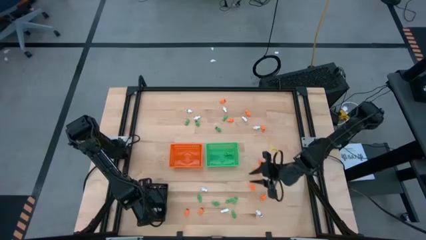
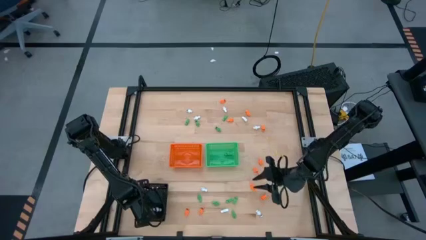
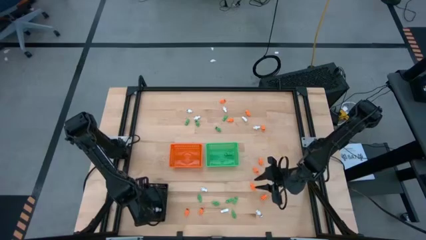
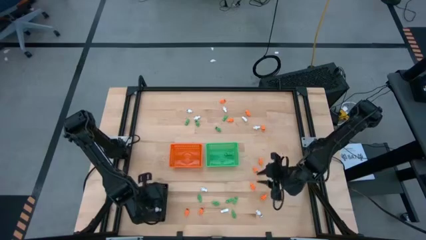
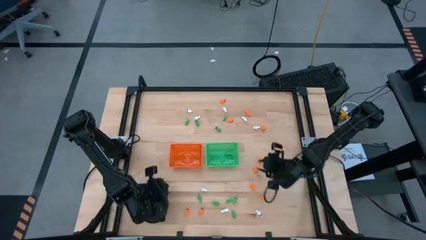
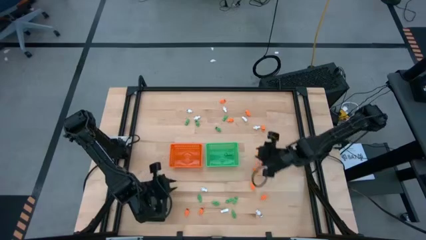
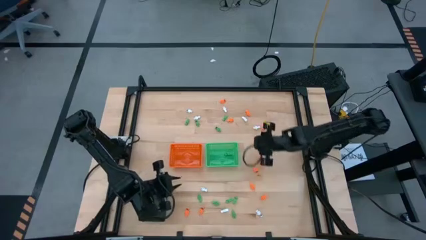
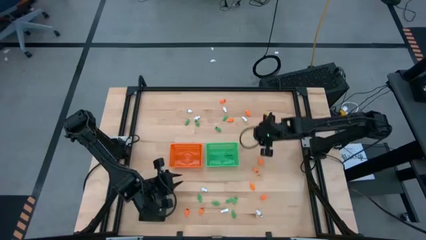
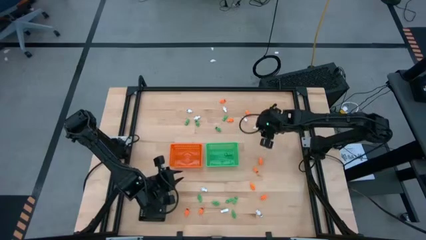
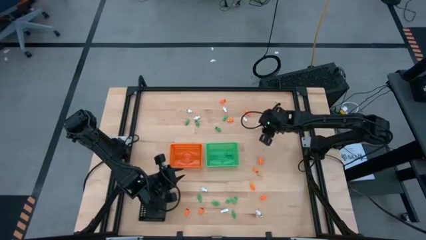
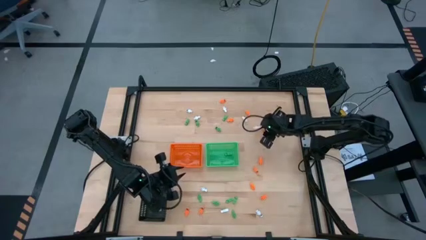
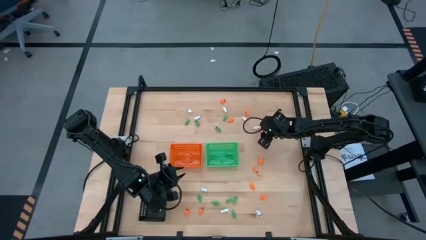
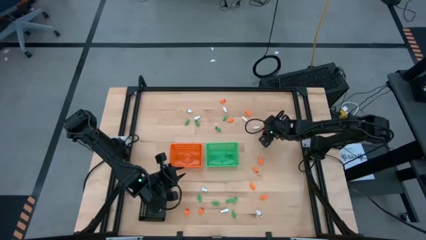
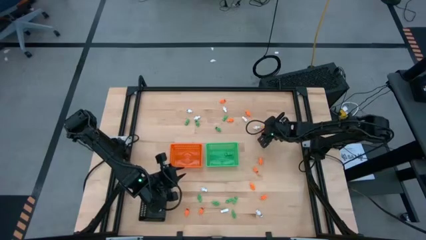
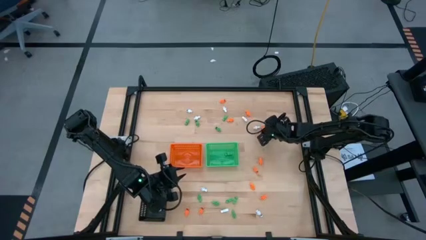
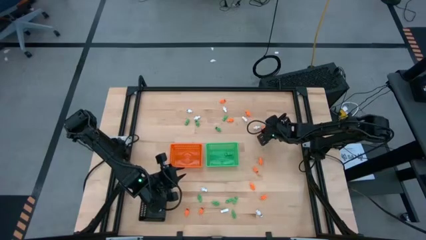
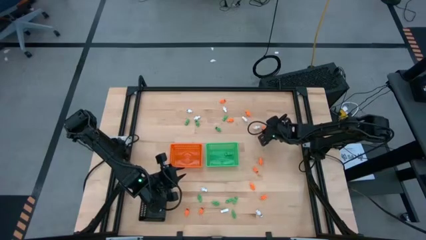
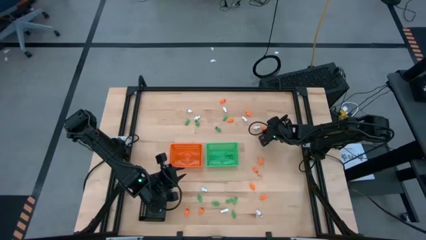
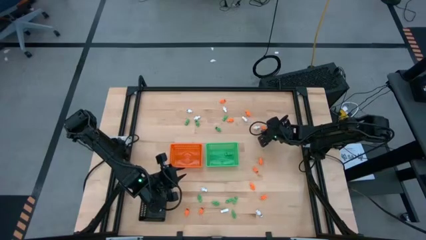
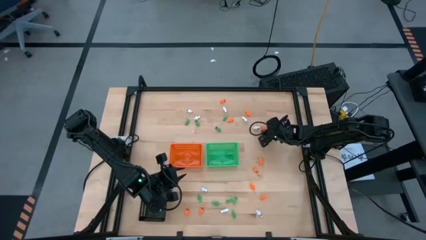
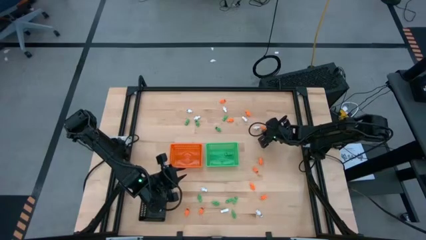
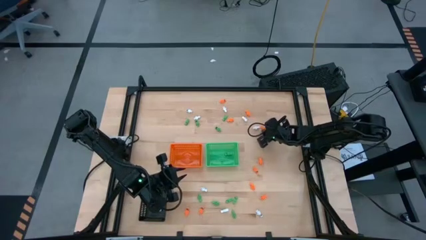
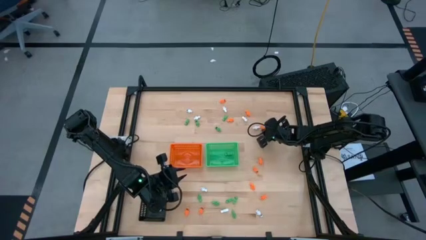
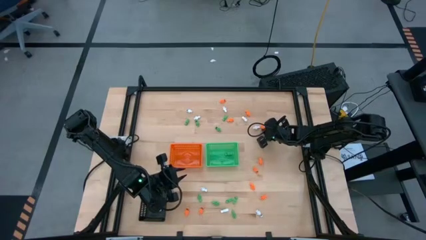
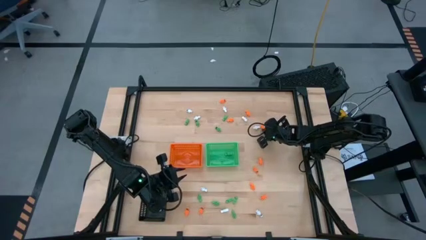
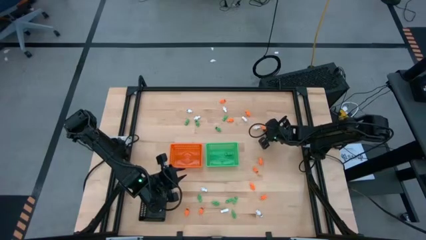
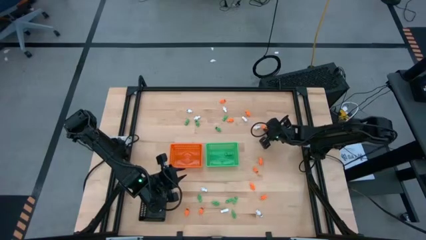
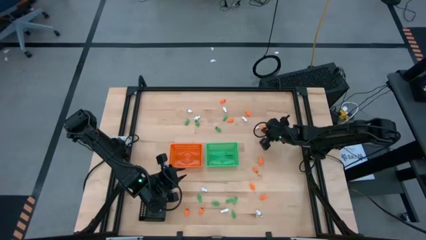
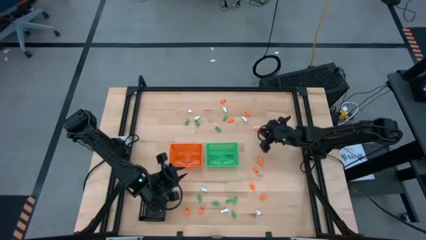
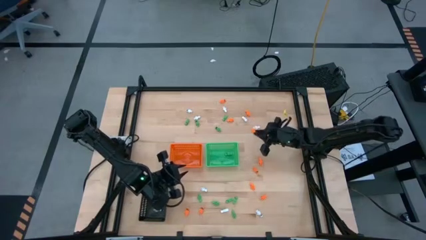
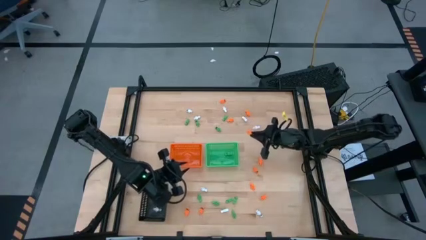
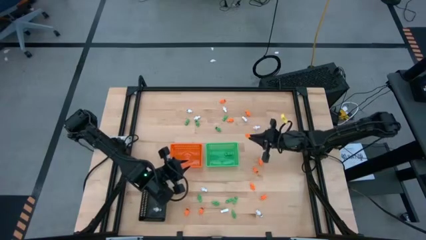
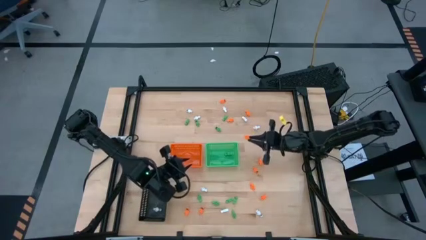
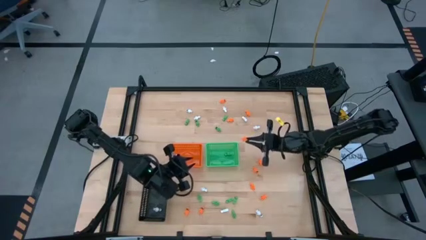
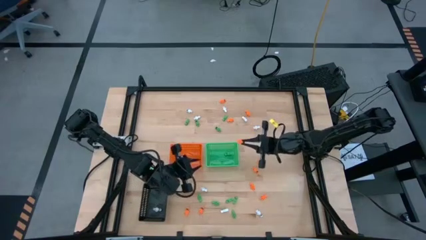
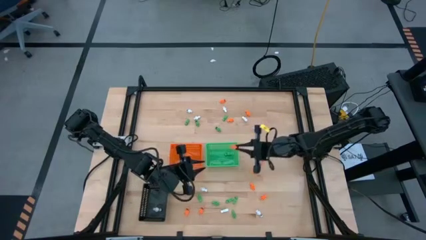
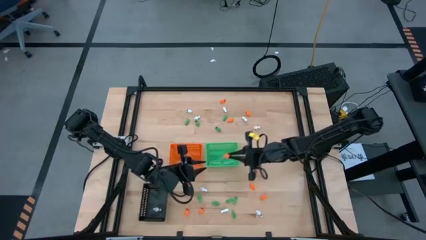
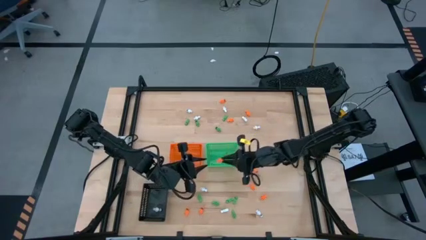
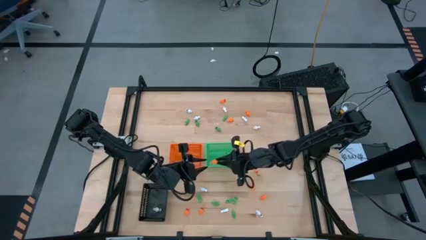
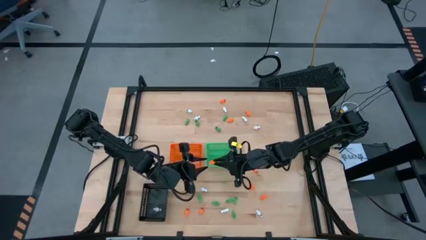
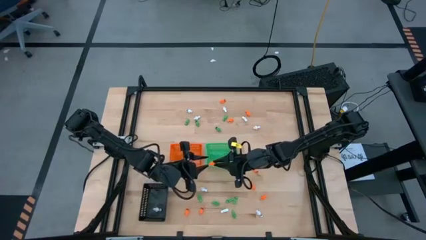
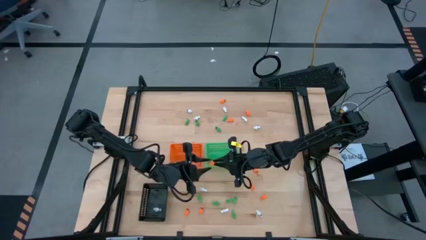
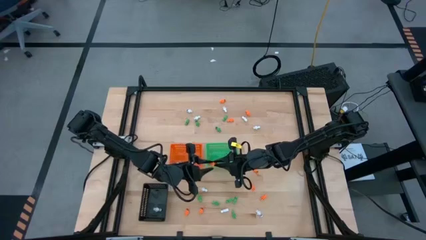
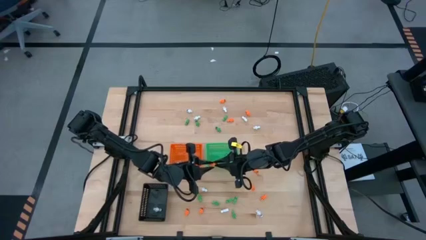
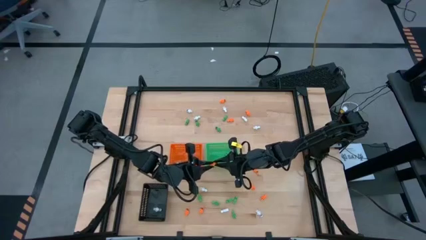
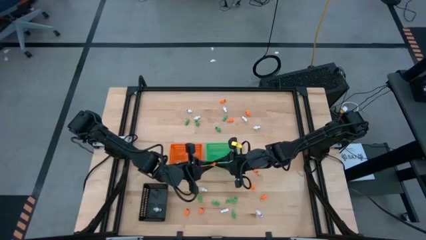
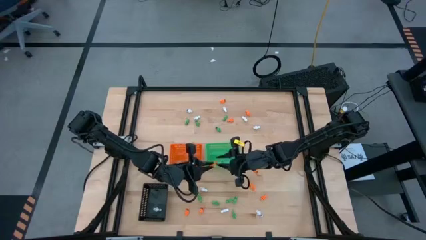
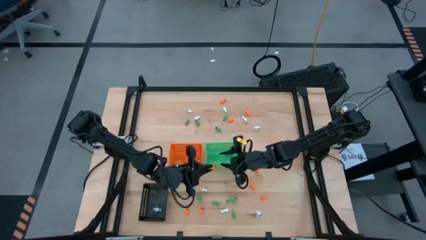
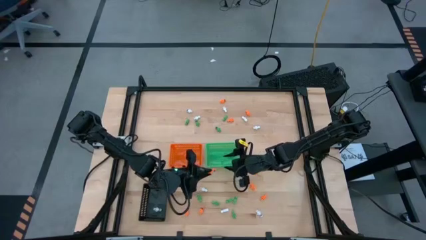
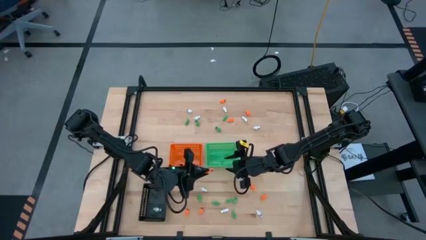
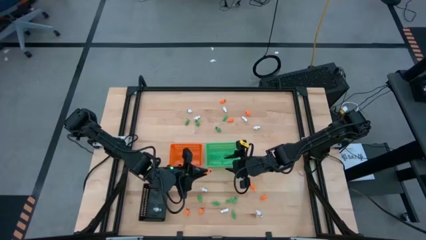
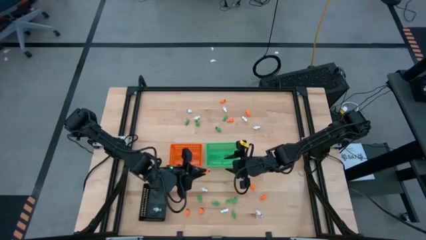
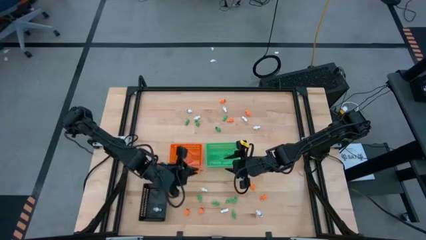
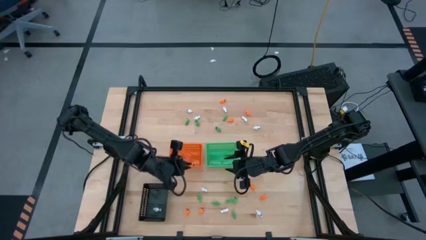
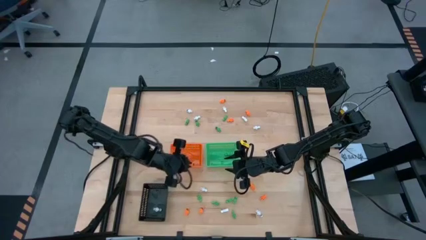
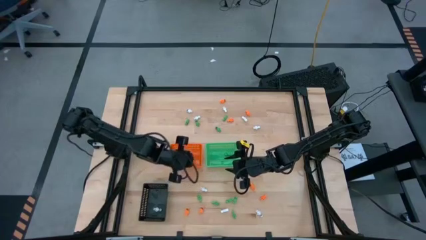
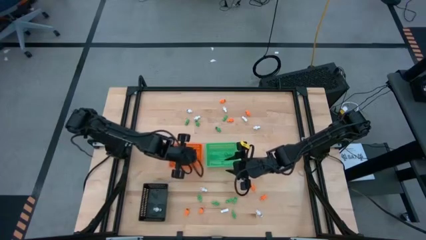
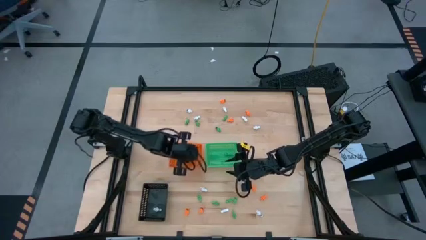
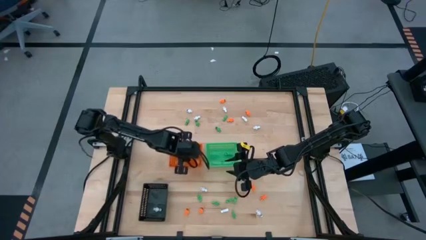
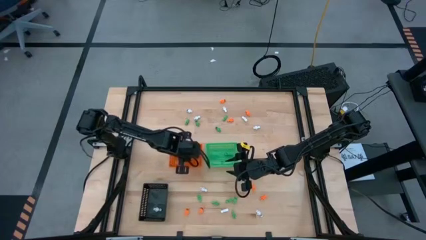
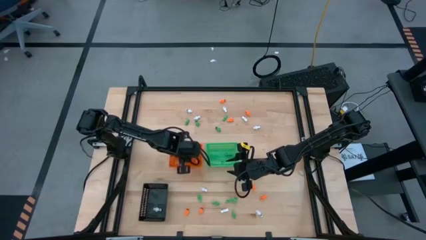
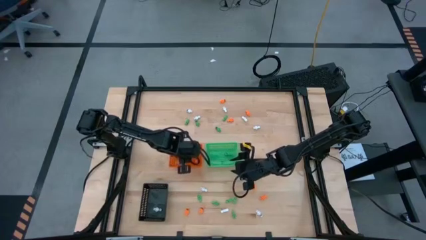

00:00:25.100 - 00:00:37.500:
Task: Sort Halloween decoration
Put the orange skeleton toy into the orange bin
